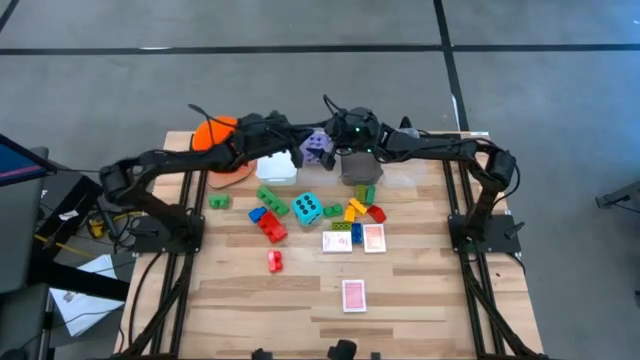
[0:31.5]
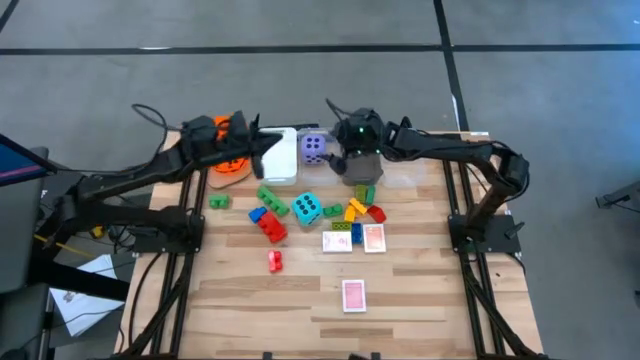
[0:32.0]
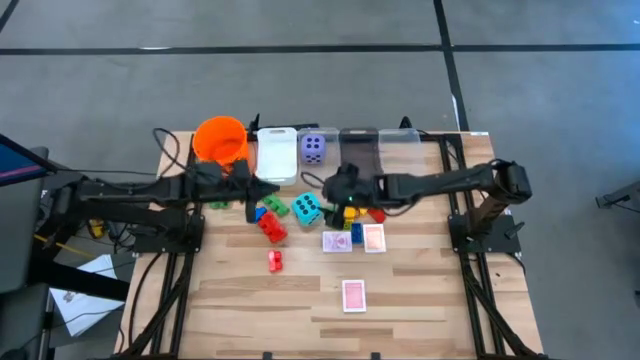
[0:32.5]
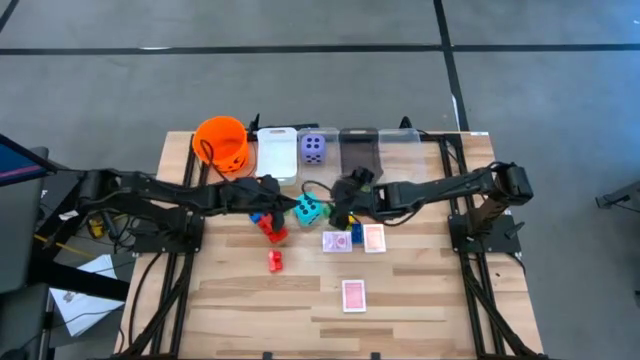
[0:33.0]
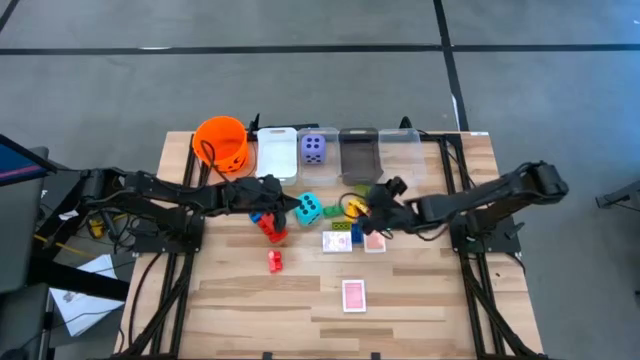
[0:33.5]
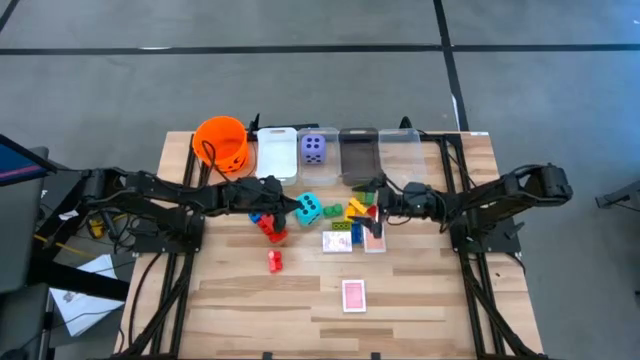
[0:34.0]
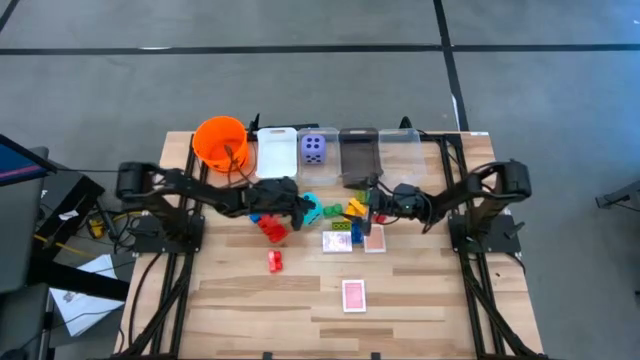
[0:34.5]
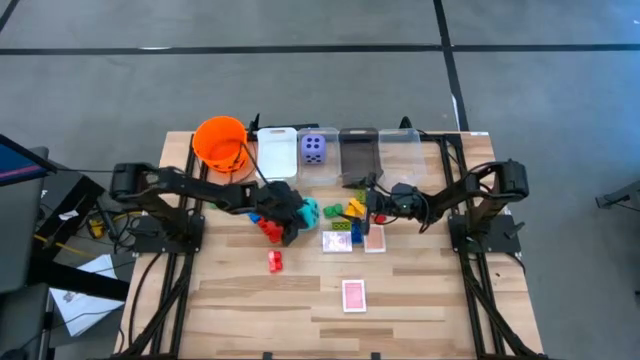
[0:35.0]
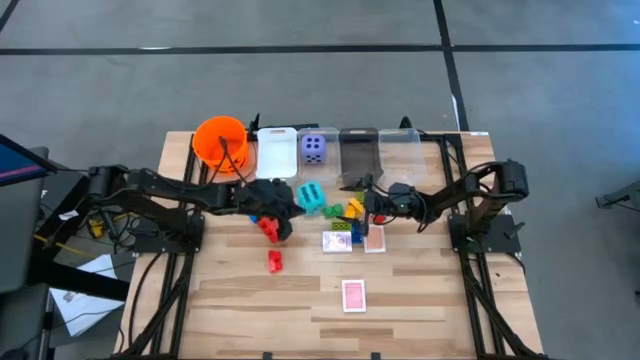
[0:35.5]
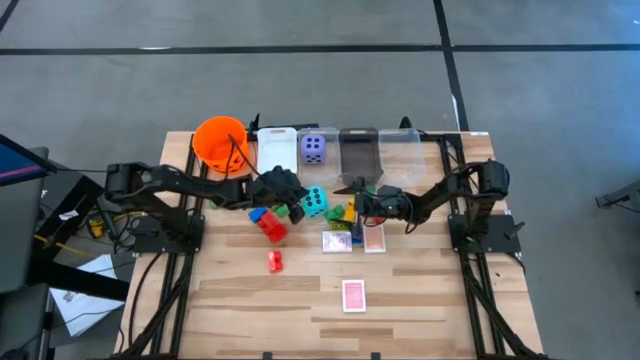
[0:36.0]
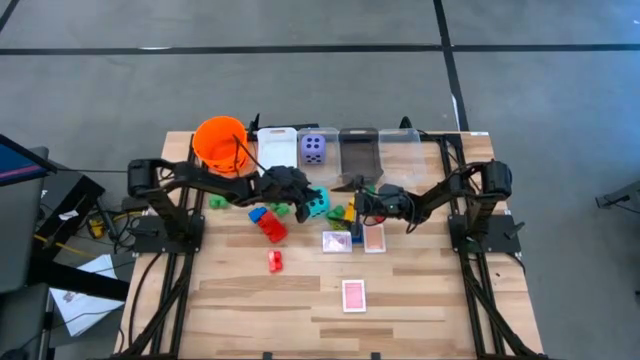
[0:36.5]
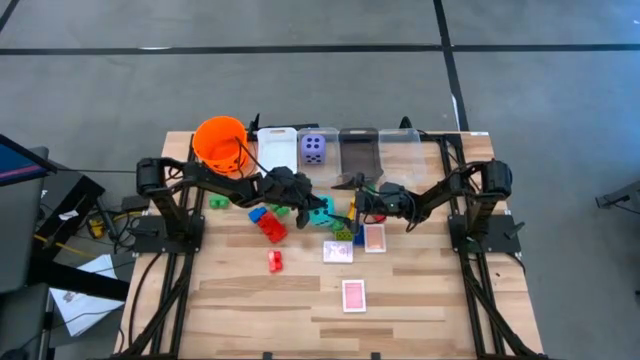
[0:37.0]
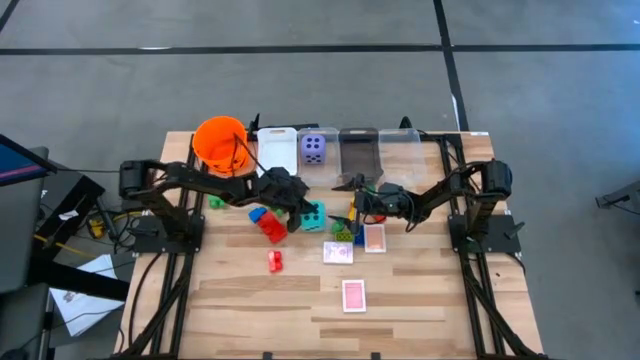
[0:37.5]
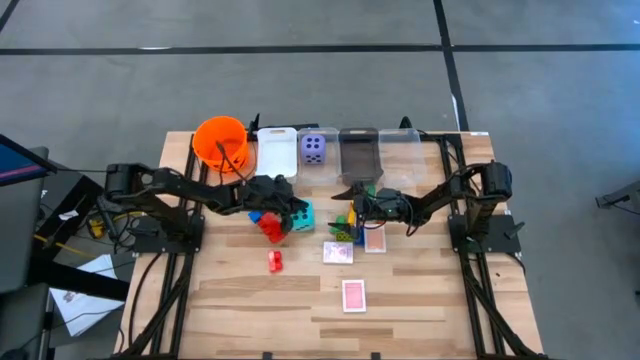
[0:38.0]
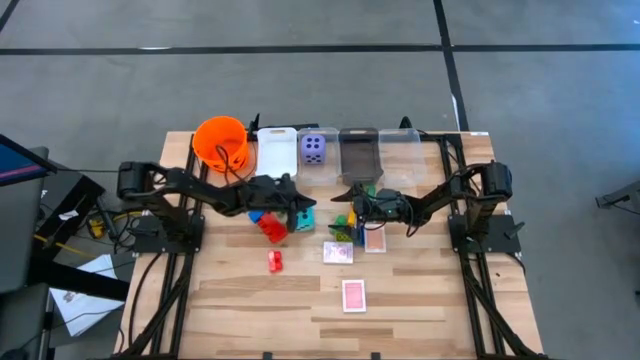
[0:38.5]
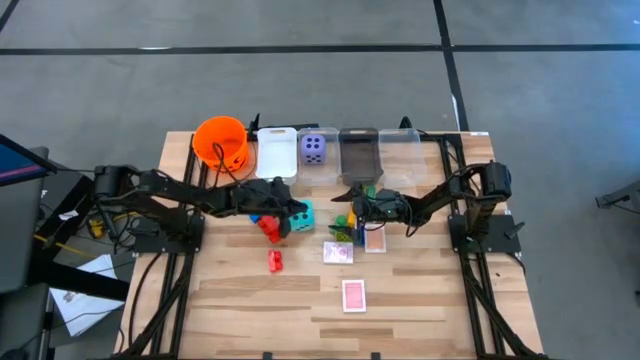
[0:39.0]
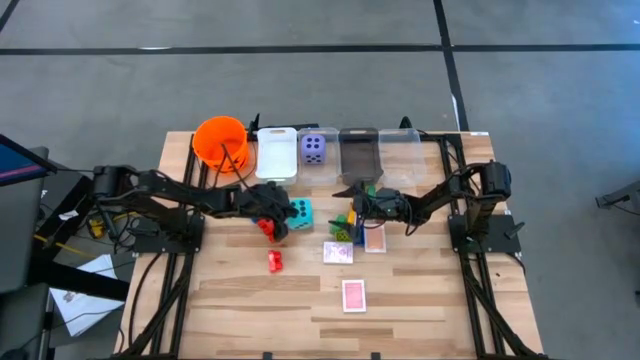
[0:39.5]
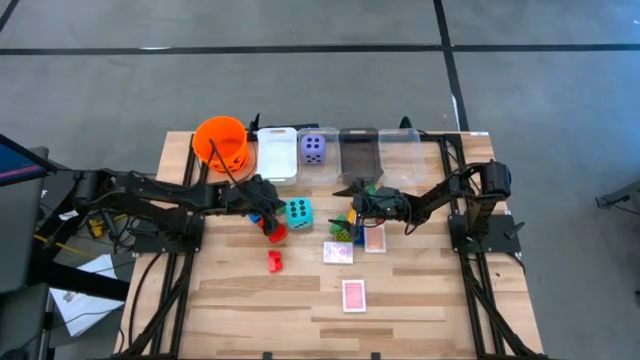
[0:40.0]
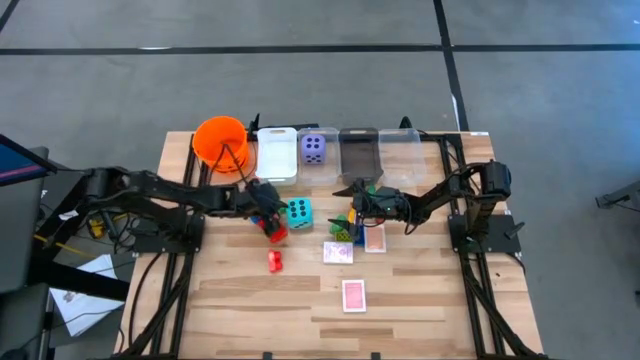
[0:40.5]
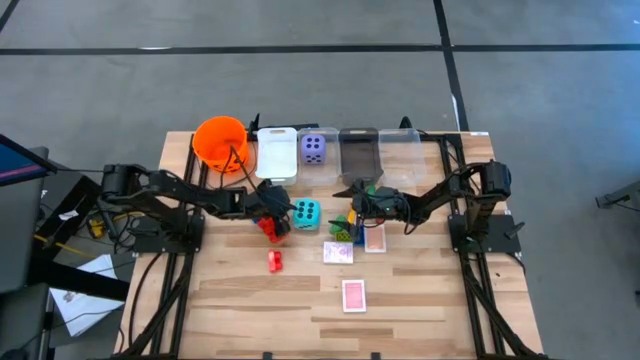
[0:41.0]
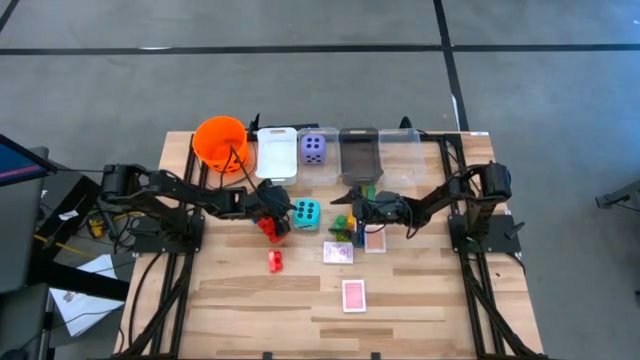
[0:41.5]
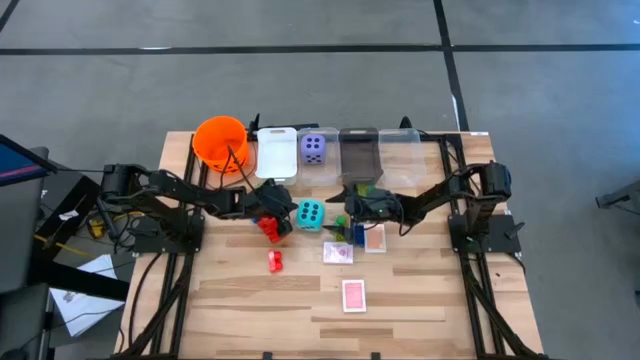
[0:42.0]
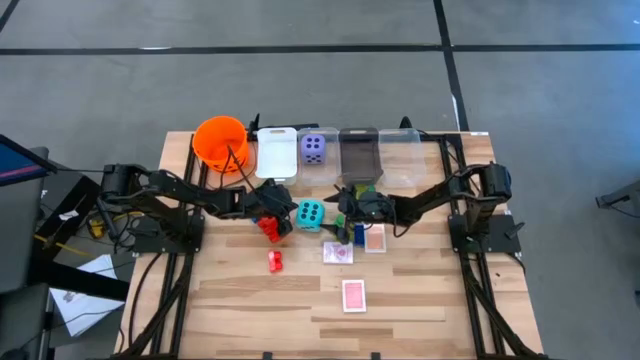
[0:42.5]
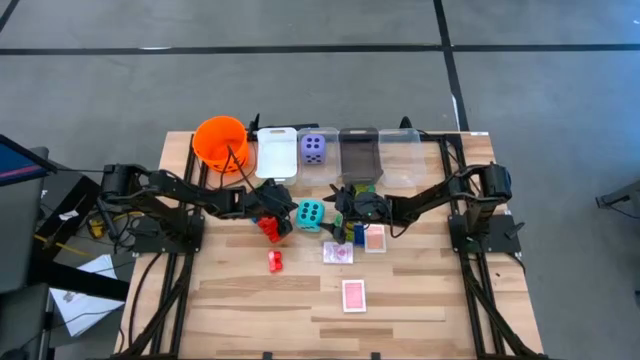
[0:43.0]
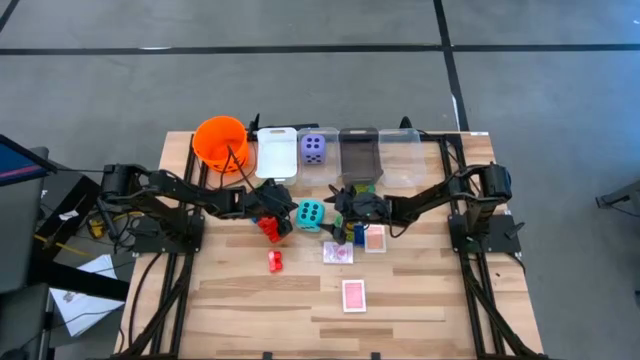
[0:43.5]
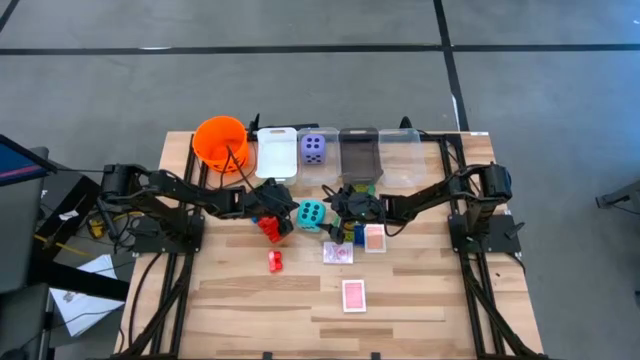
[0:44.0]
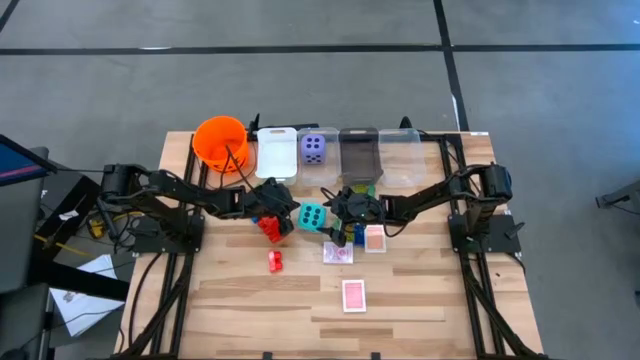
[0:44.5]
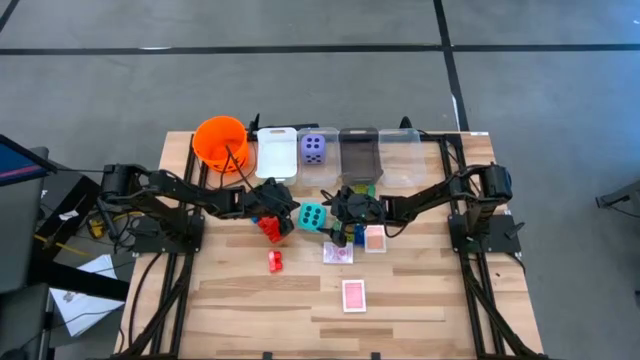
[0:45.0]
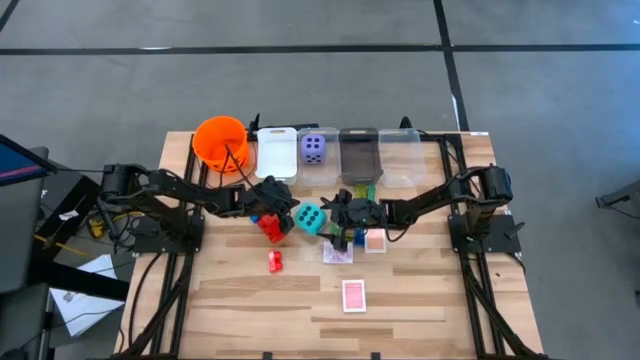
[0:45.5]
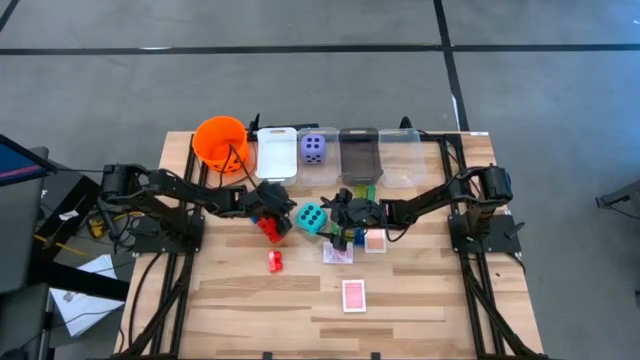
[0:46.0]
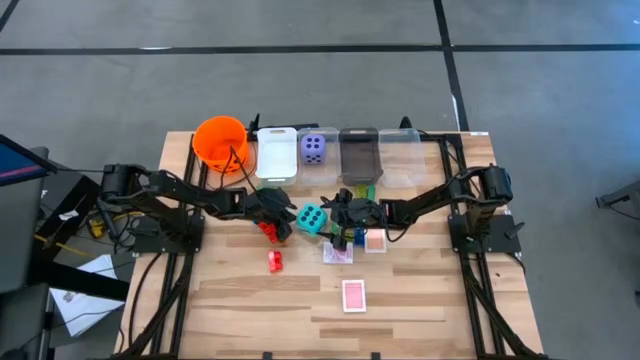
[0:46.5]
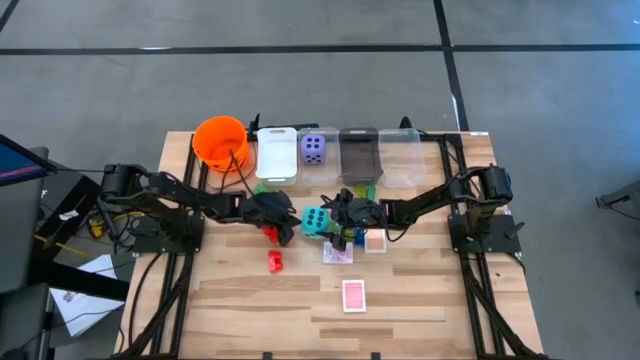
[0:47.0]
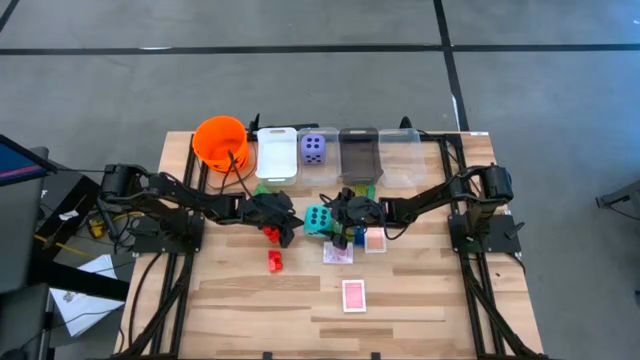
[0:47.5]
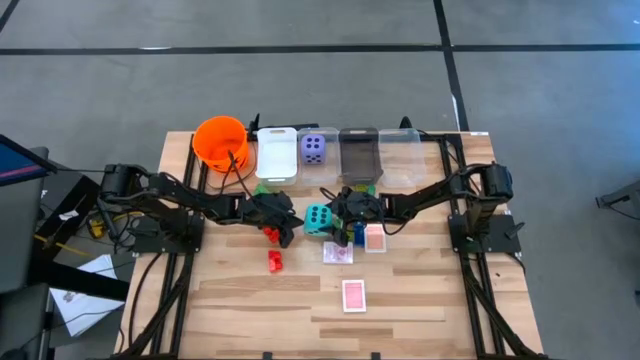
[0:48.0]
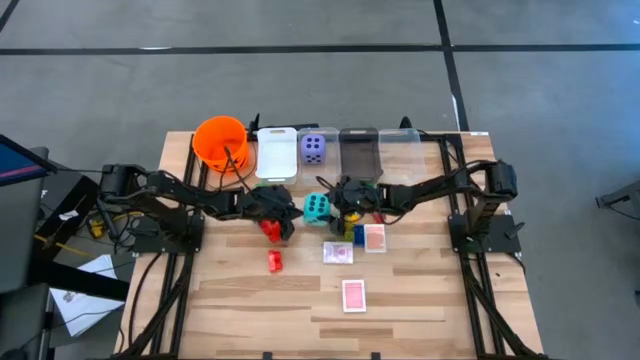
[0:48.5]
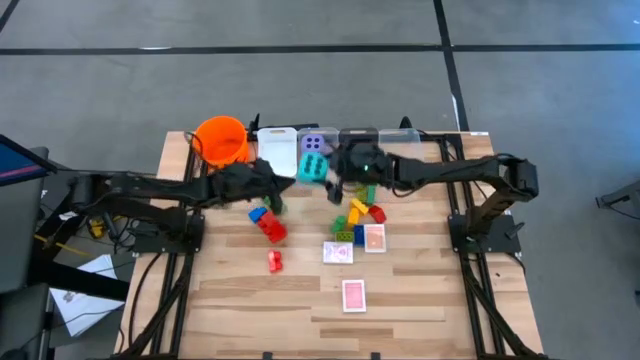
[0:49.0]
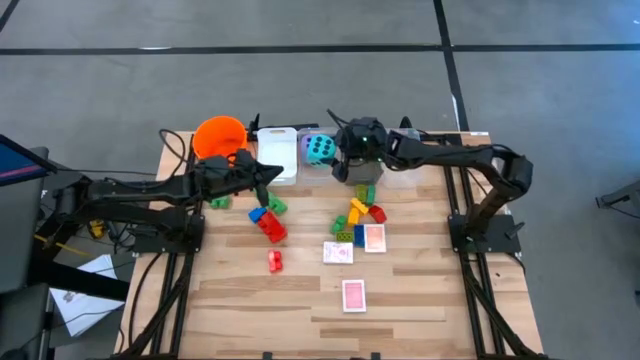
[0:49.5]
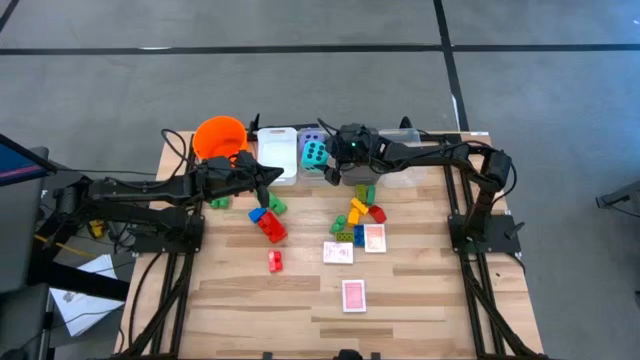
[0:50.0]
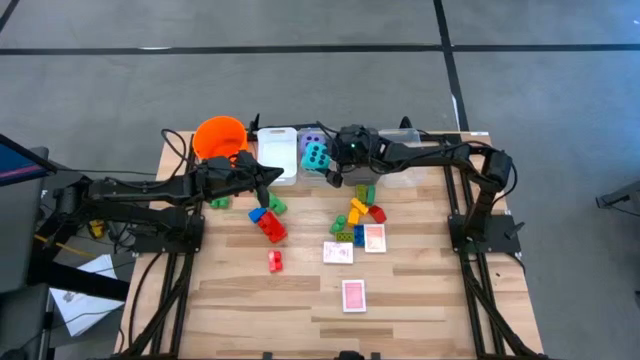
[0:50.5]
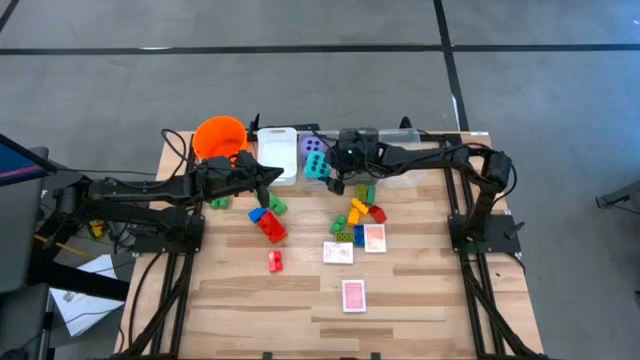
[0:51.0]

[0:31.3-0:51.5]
Task: Pick & Place Toys
Put the light blue dice into the left transparent bin
